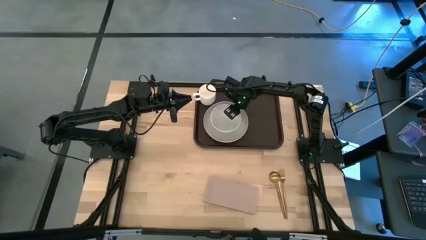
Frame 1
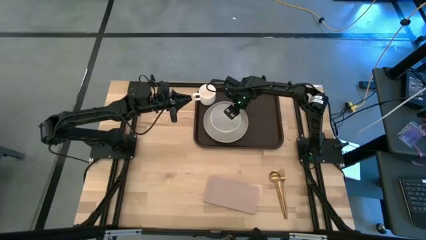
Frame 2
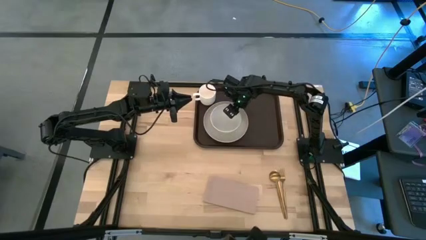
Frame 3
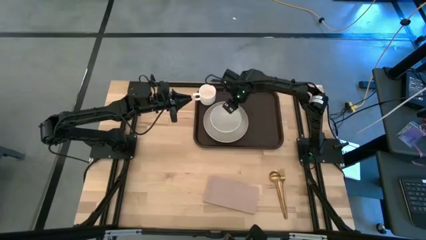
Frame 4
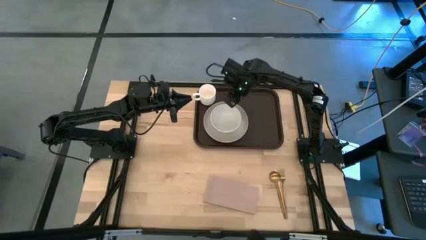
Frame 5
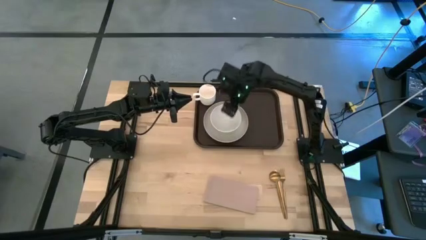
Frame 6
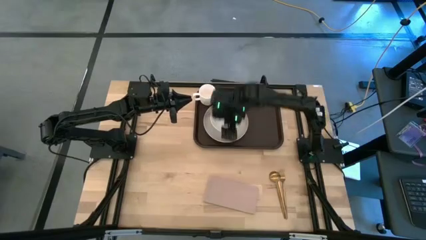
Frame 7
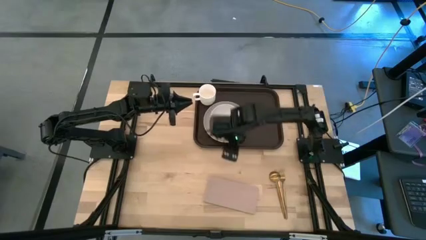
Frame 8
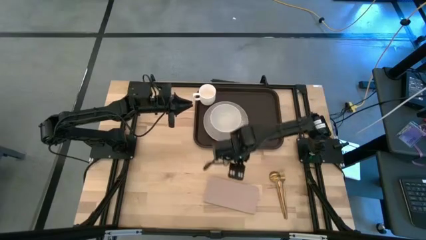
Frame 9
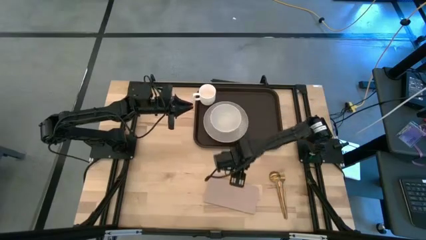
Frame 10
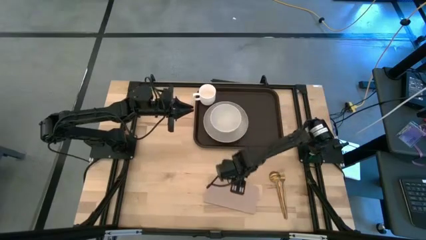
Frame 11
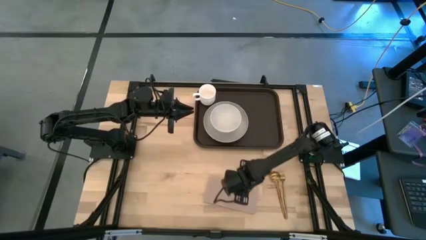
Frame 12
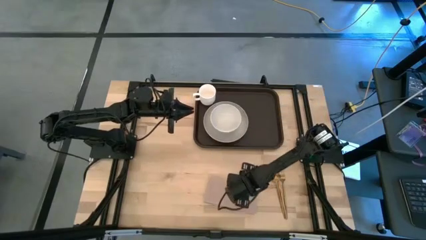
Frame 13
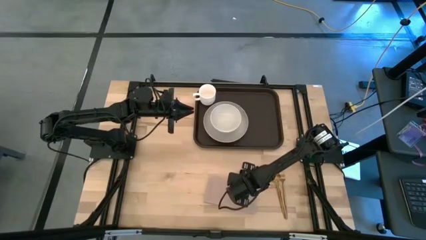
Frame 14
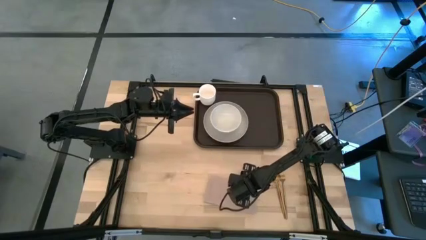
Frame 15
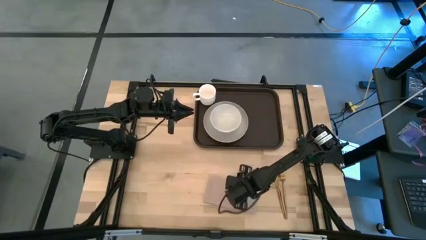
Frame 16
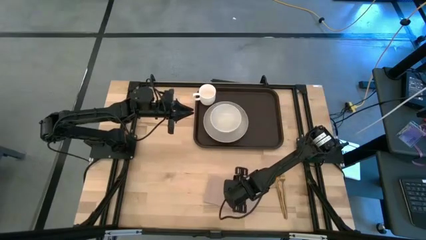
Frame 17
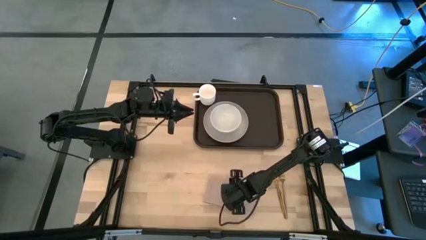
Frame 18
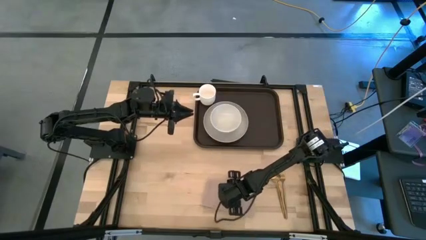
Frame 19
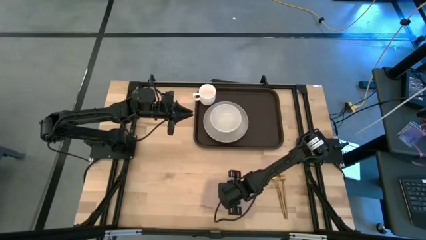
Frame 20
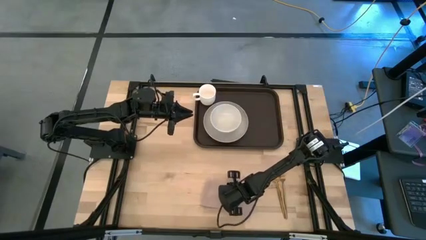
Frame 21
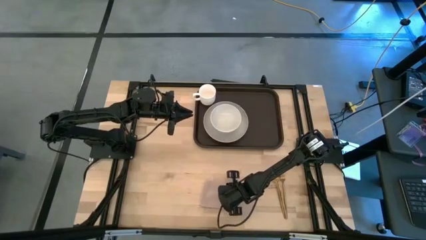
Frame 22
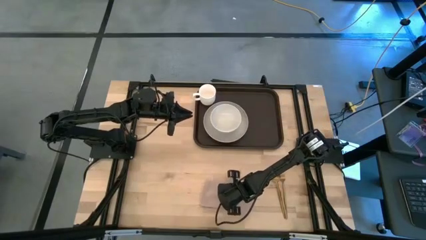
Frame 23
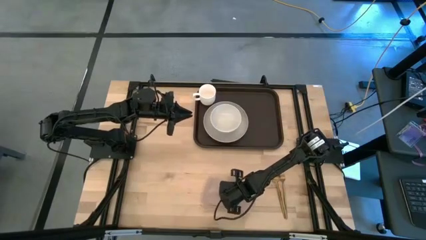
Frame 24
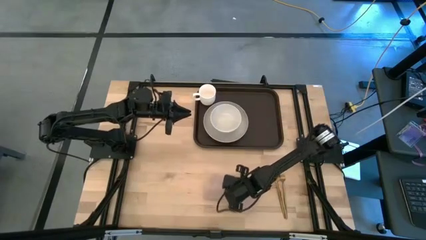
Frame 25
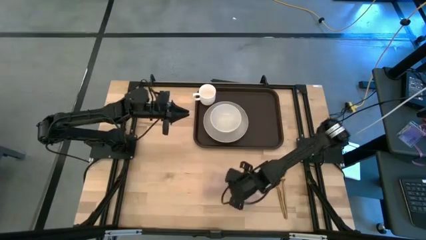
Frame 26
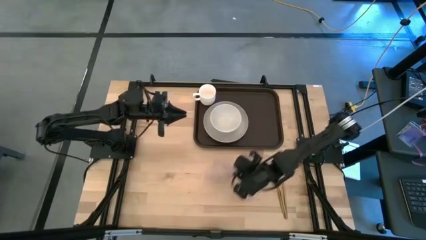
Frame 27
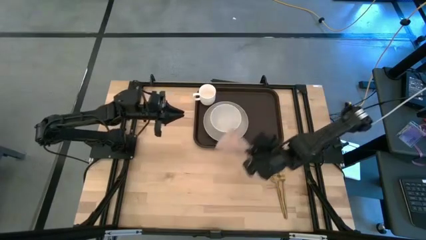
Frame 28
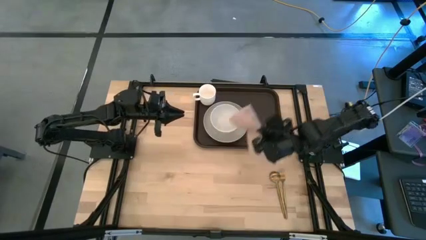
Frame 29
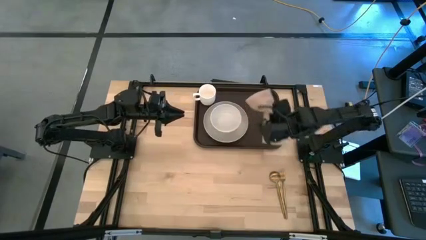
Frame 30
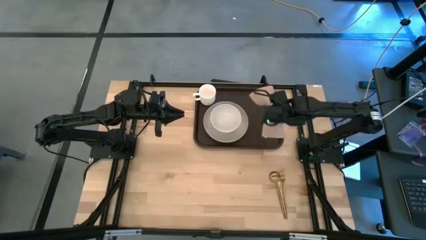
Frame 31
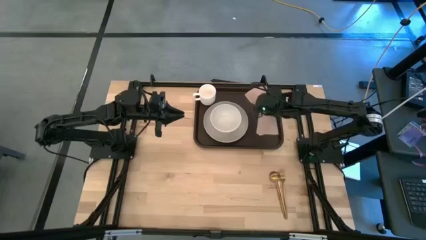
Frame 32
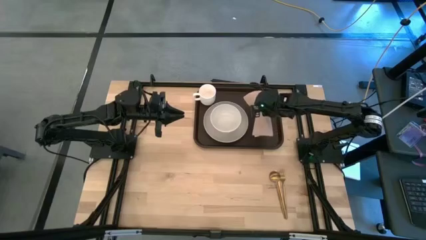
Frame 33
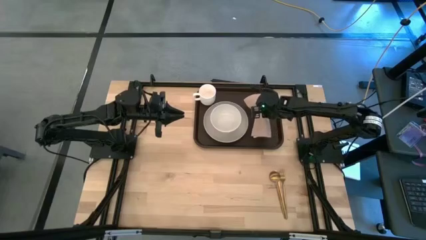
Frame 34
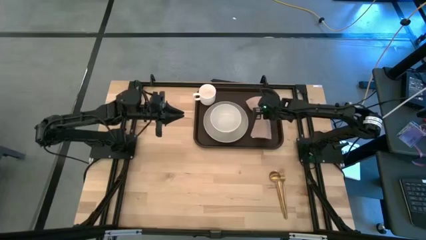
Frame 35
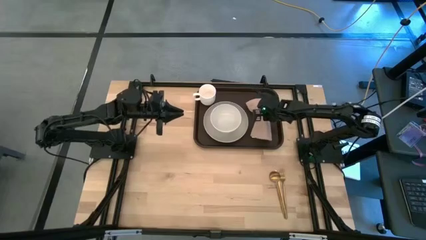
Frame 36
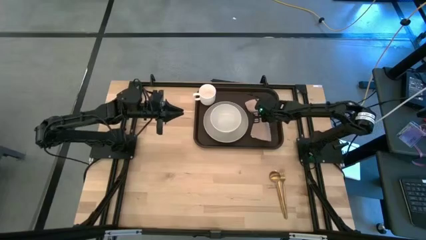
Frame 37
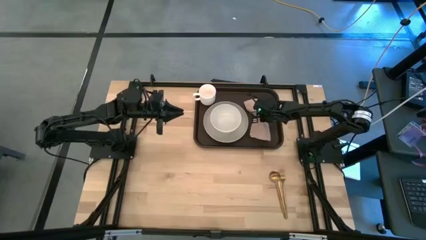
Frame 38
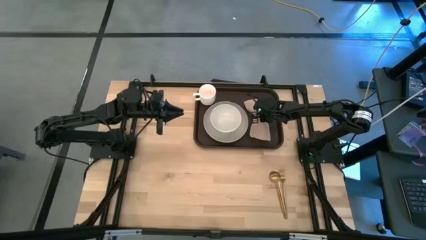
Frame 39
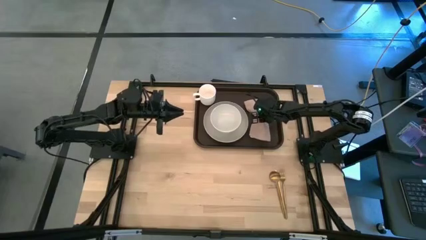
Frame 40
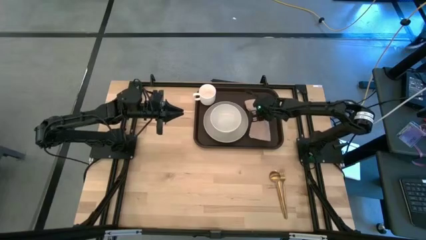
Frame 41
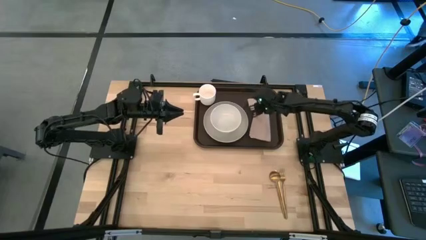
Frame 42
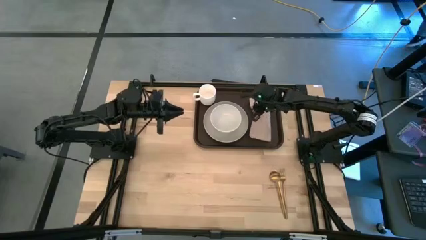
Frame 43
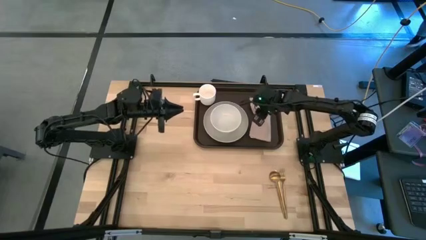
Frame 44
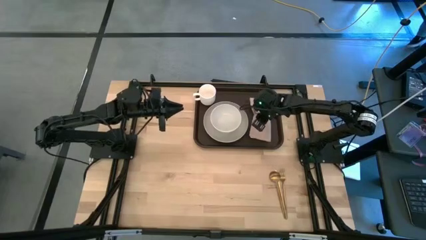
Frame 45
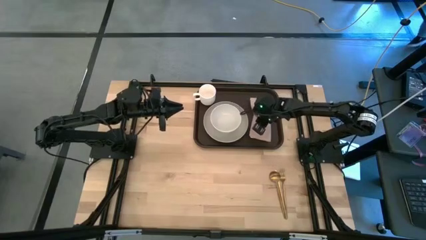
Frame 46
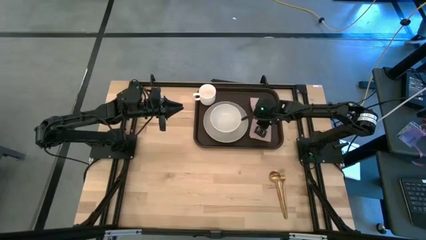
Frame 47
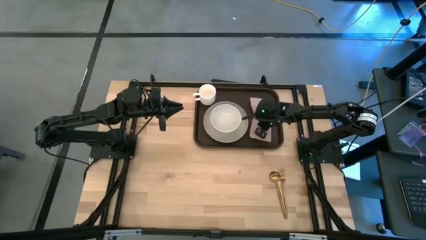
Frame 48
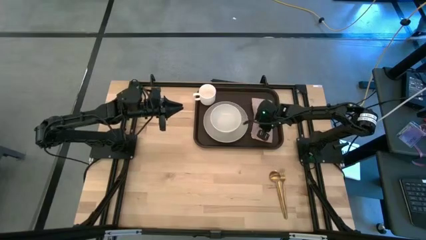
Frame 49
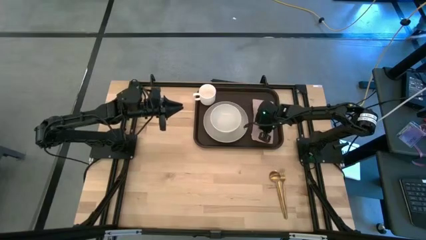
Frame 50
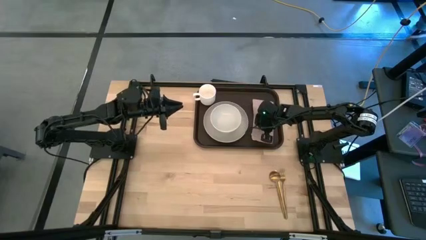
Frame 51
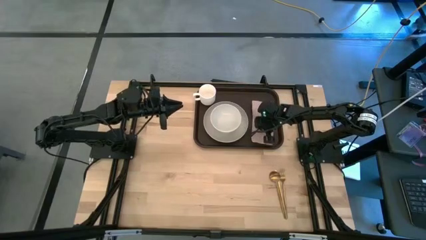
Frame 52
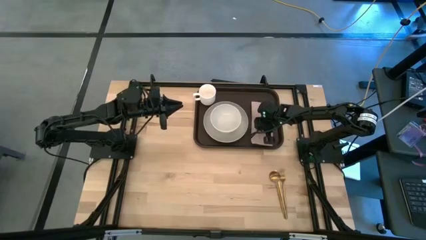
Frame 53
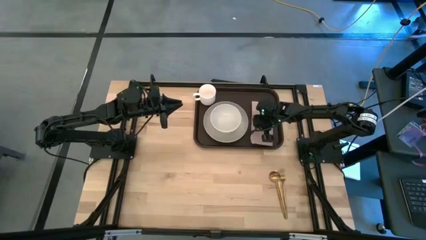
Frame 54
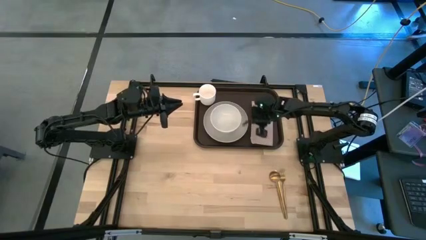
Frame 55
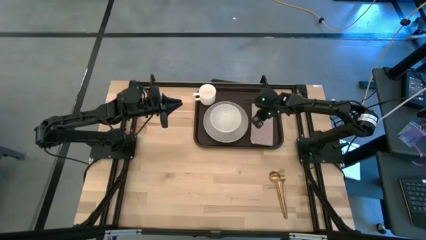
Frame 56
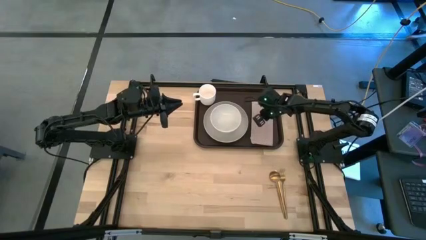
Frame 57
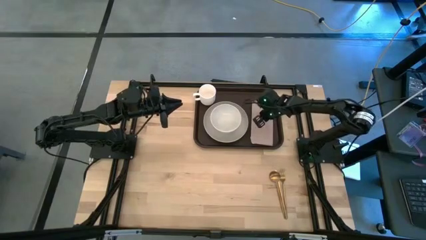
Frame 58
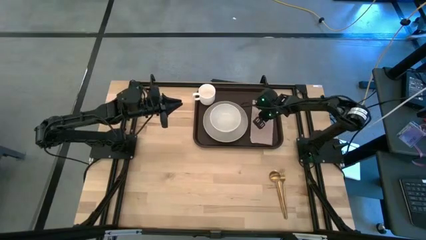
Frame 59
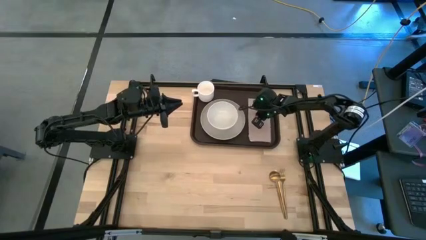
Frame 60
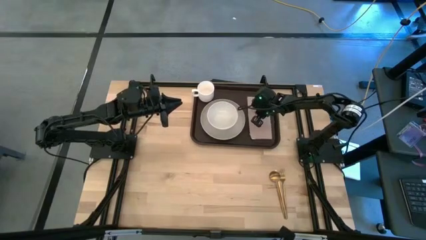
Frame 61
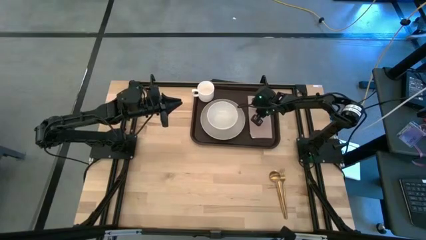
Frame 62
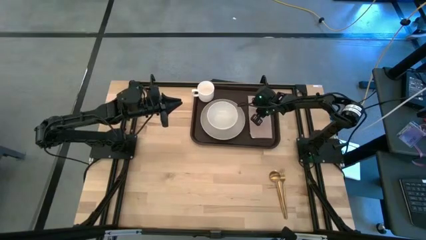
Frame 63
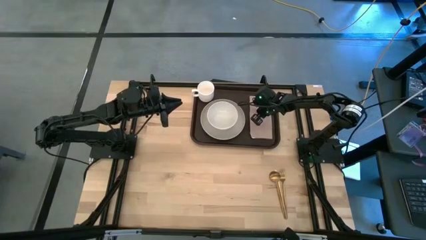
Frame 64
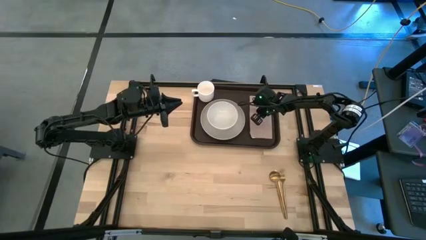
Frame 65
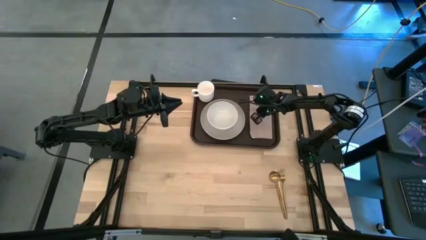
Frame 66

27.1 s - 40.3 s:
Task: Set up tray
Put the brown napkin to the right of the gray plate on the black serving tray

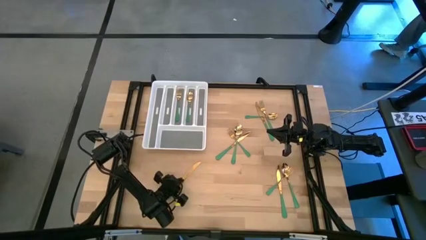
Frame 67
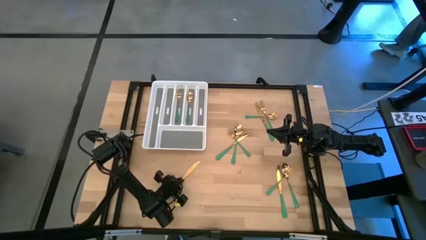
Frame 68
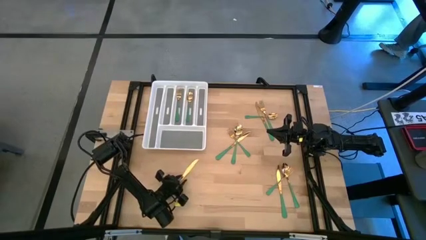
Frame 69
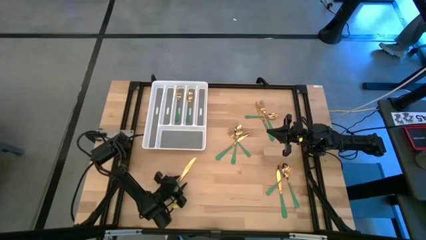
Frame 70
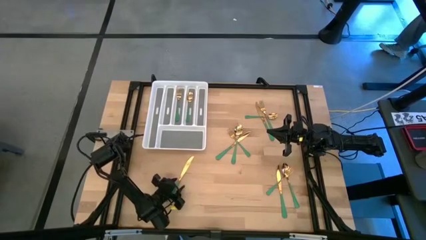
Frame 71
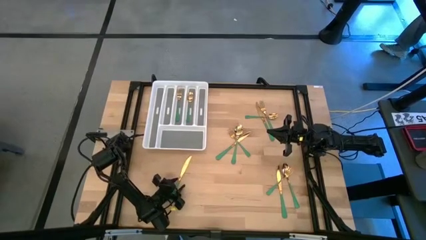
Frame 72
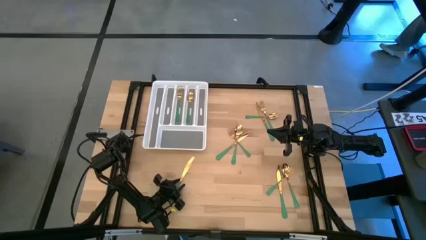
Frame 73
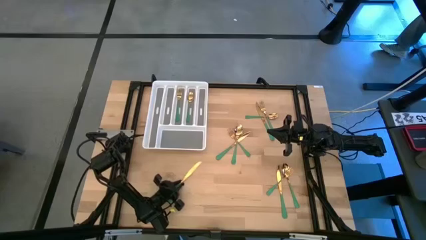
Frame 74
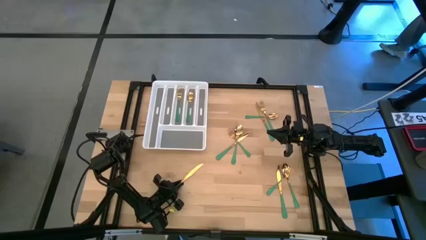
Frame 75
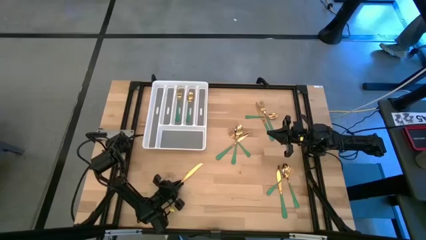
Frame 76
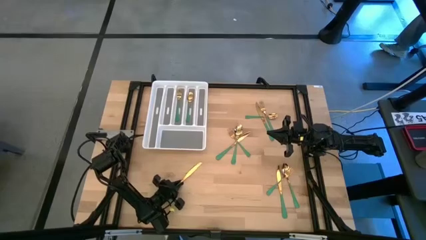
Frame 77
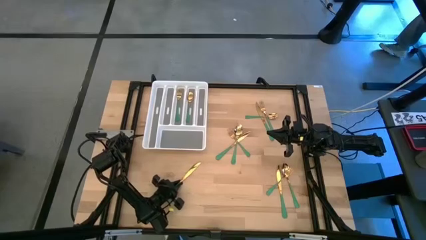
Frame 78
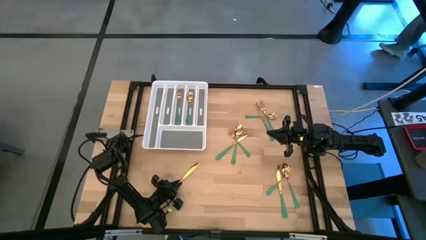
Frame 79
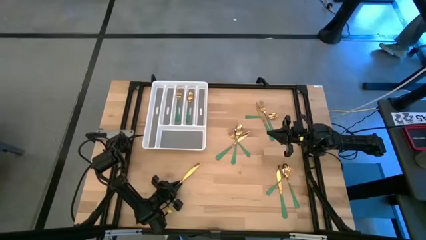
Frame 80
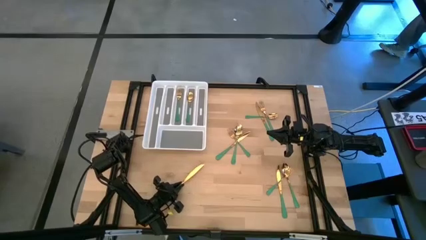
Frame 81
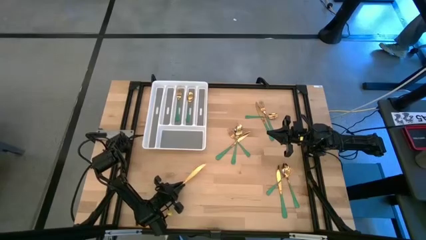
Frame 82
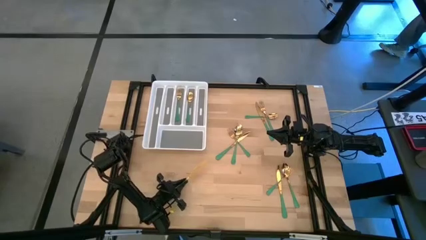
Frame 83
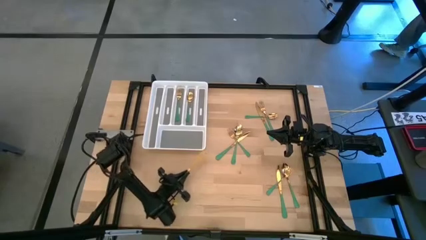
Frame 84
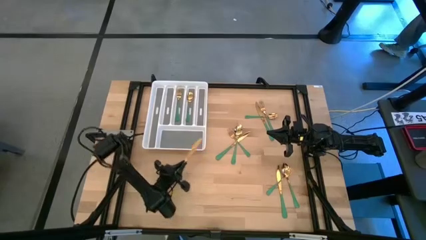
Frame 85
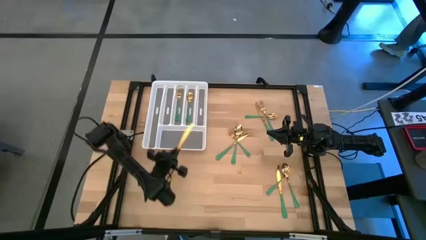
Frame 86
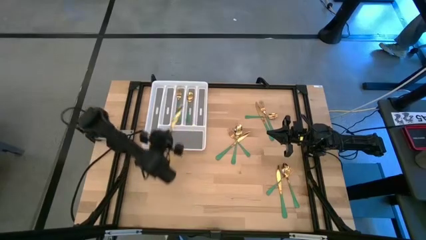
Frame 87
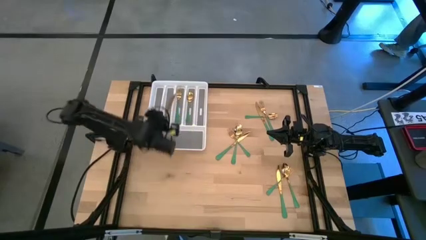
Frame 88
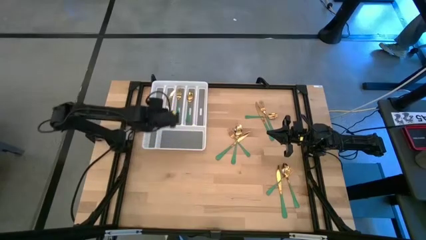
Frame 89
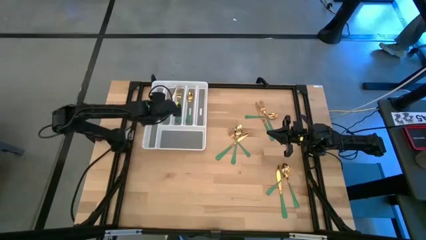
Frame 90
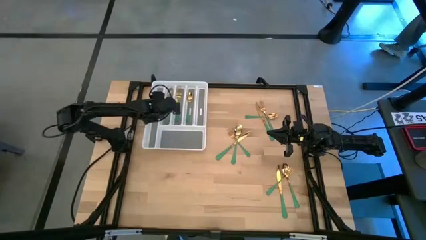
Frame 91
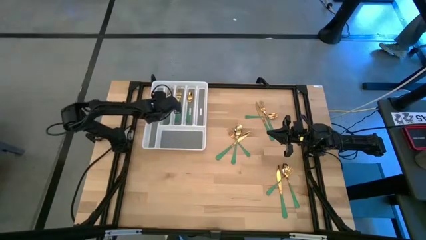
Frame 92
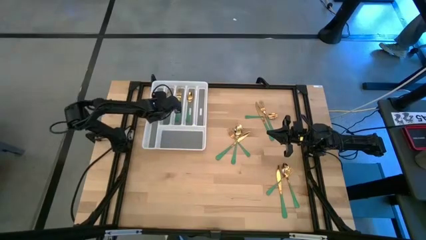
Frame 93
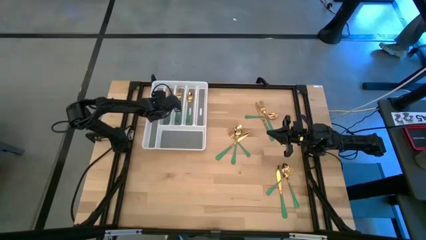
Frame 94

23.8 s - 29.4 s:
Task: Sort silverware
Put the green knife into the white cutlery tray
